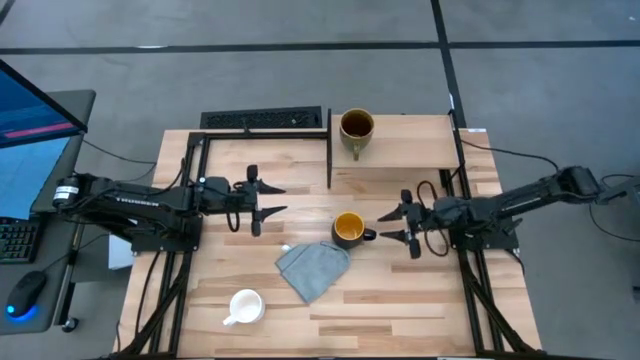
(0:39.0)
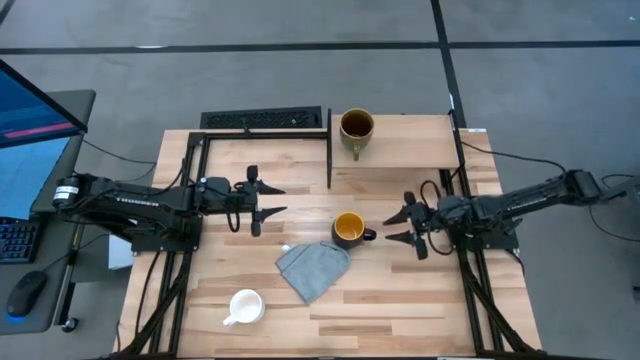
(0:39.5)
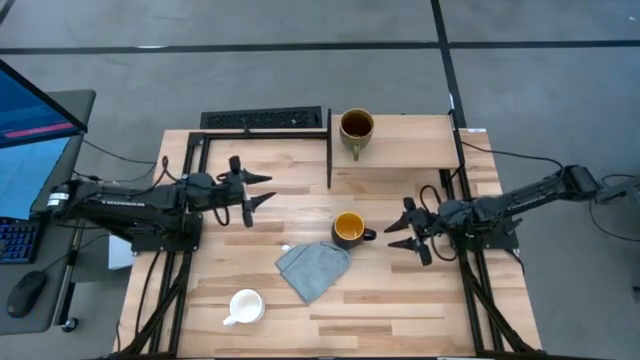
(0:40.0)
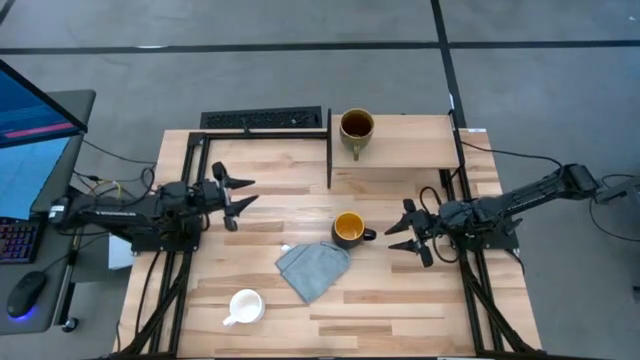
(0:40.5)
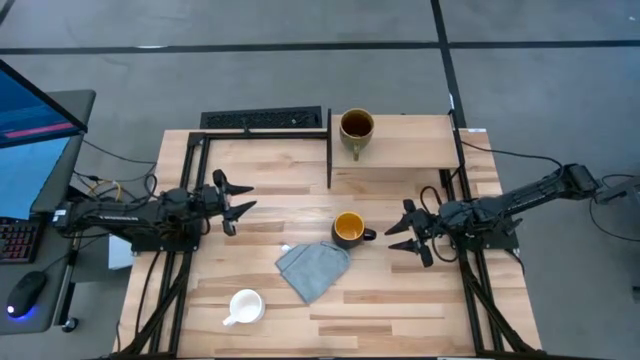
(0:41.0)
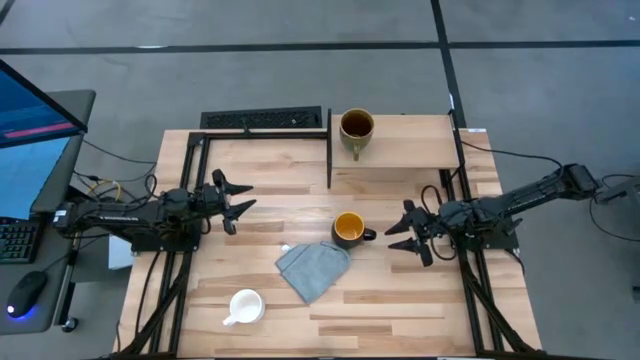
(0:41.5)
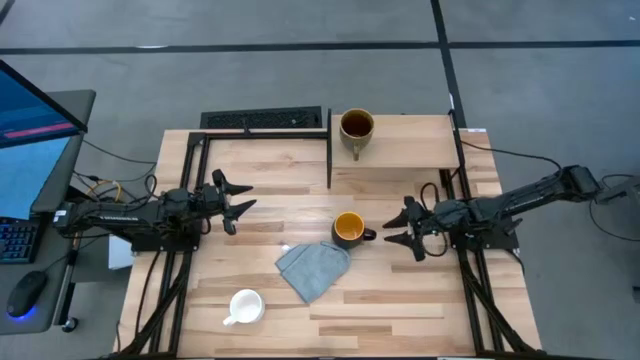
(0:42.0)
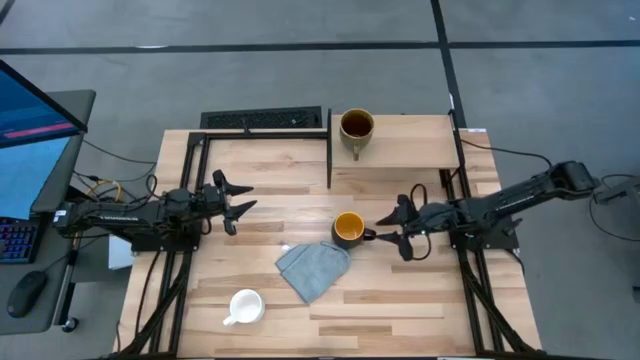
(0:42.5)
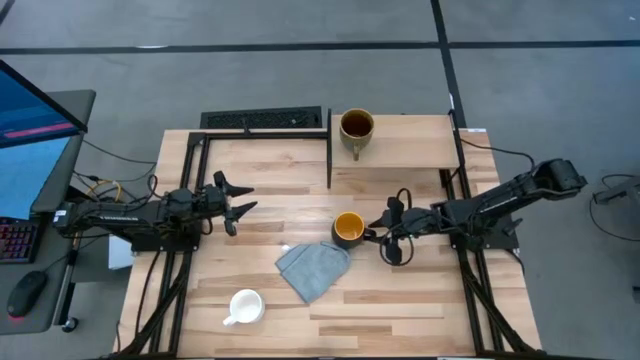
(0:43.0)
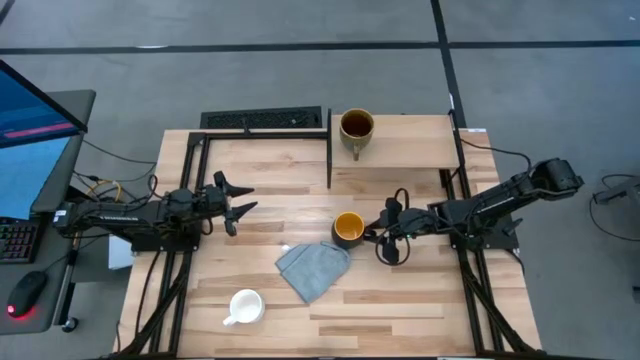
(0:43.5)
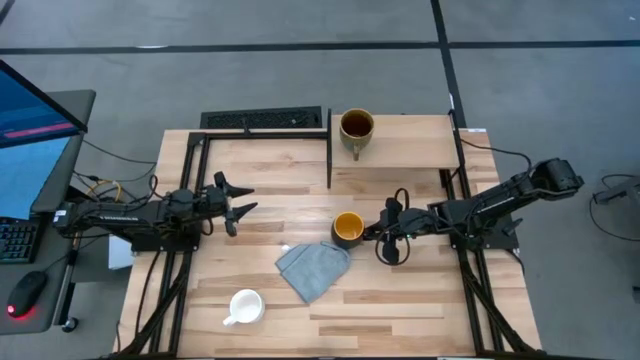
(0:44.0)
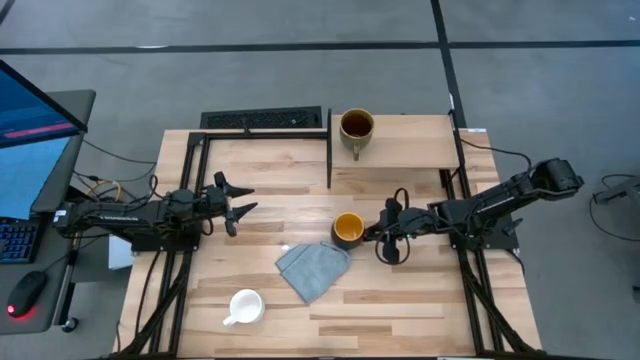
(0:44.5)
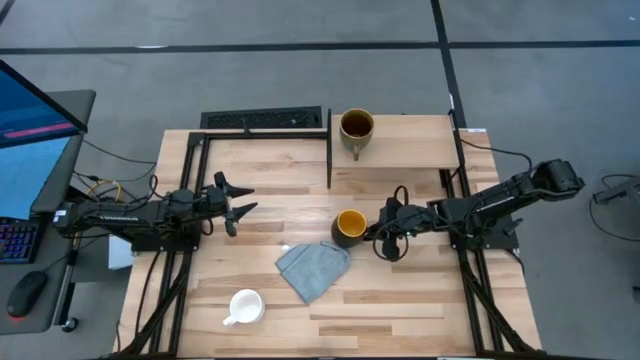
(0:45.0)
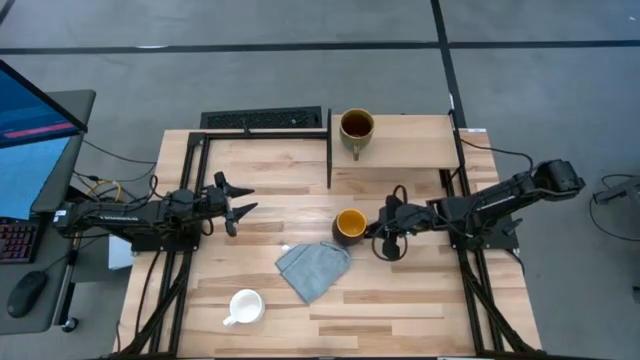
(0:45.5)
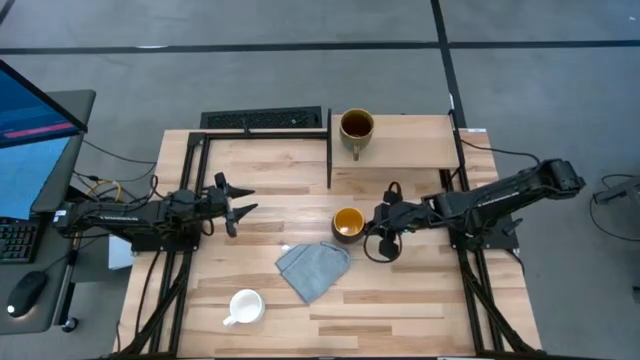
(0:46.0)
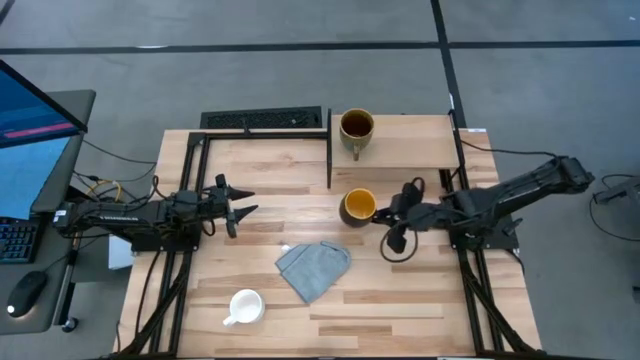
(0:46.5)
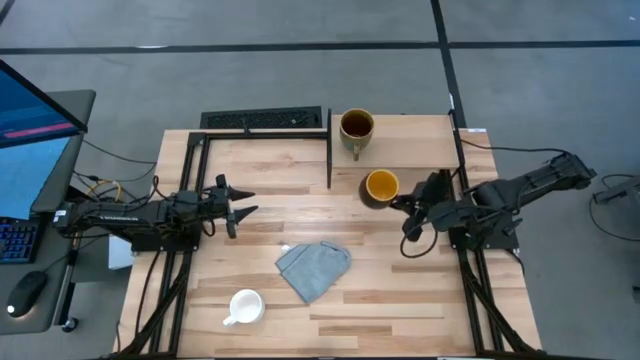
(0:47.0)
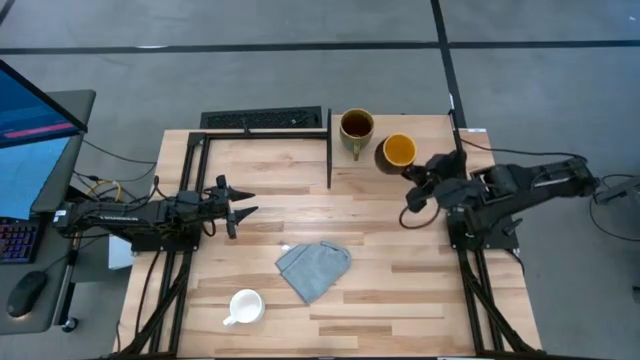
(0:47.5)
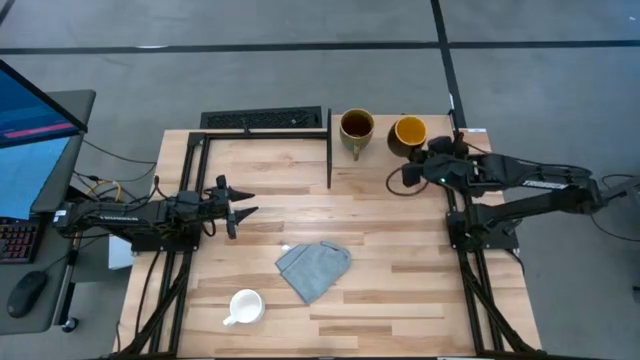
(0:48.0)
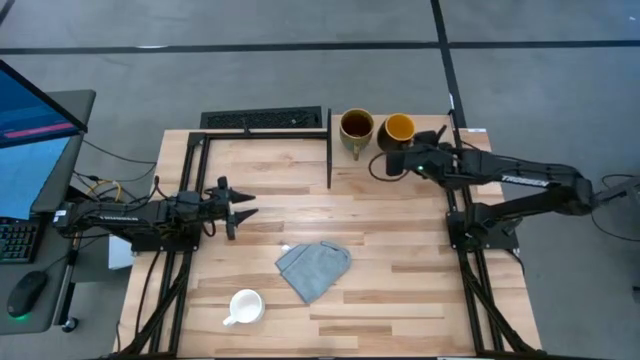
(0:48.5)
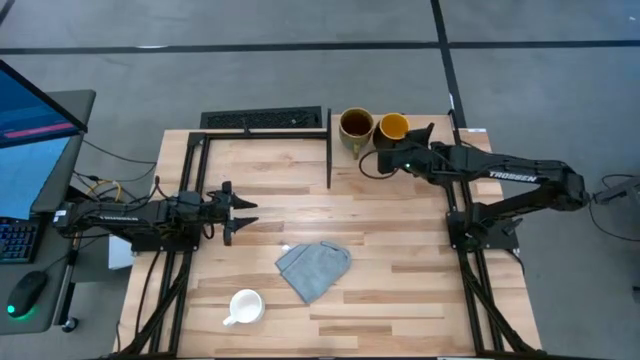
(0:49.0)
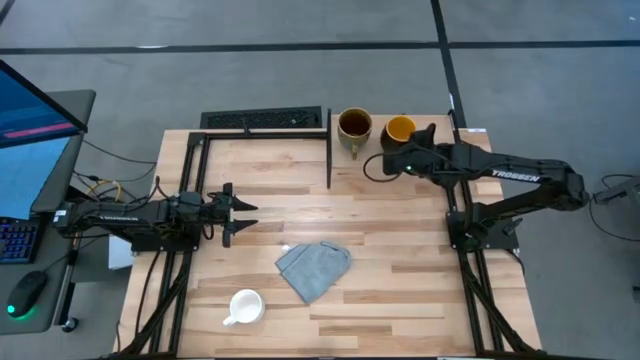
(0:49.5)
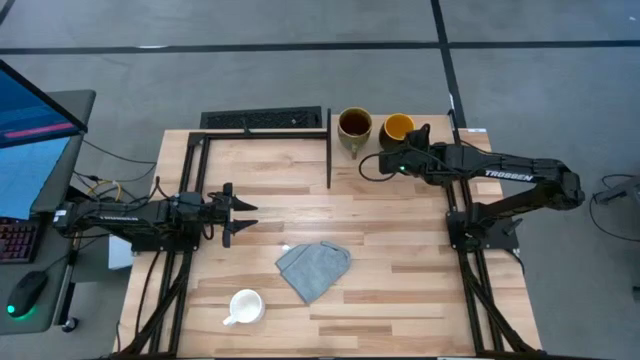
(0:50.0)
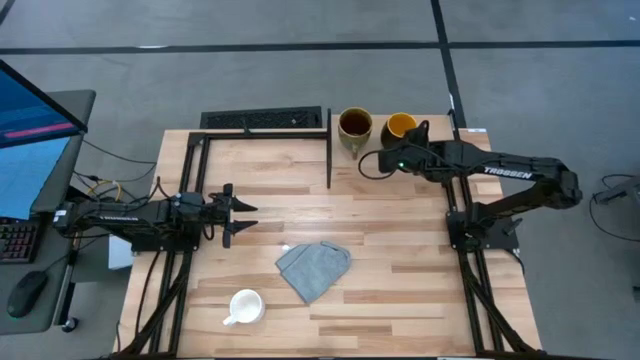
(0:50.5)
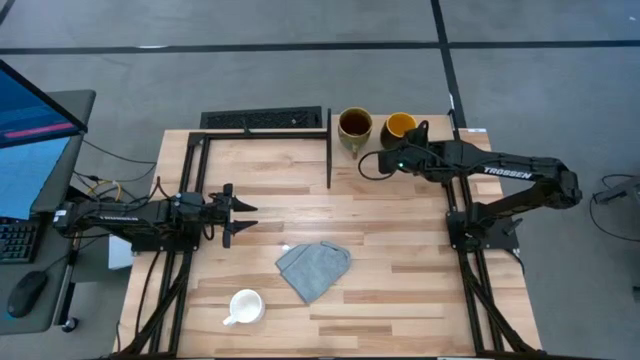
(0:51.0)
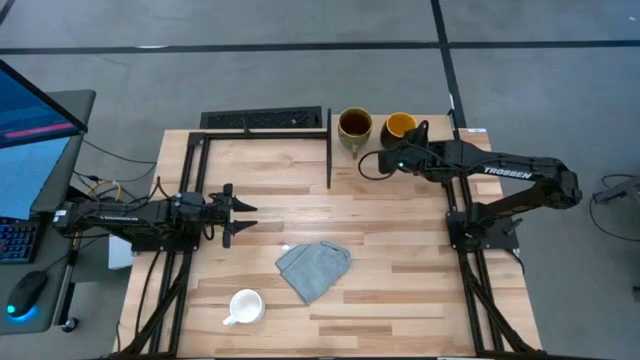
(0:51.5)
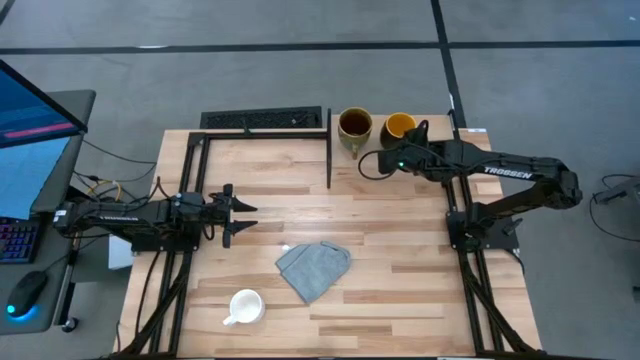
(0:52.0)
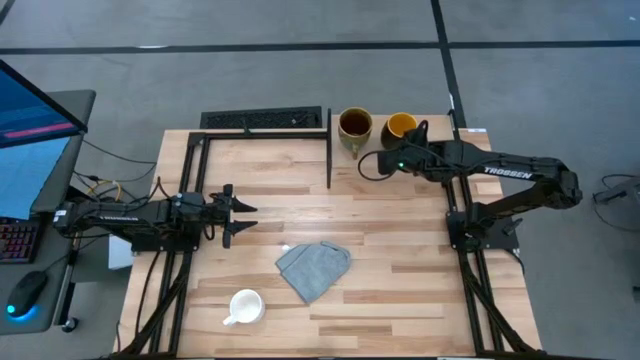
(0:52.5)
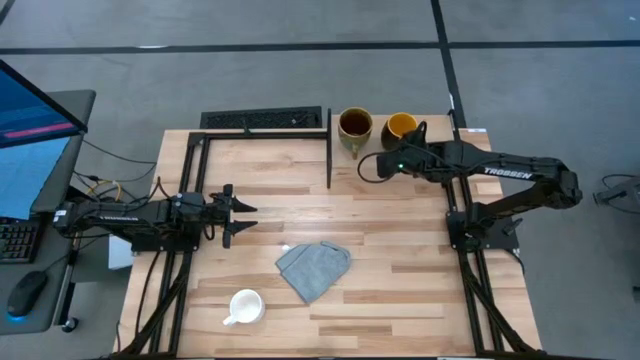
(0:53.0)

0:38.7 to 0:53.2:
Task: Stack small to large cups/mugs on shelf
Put the yellow mug on the shelf

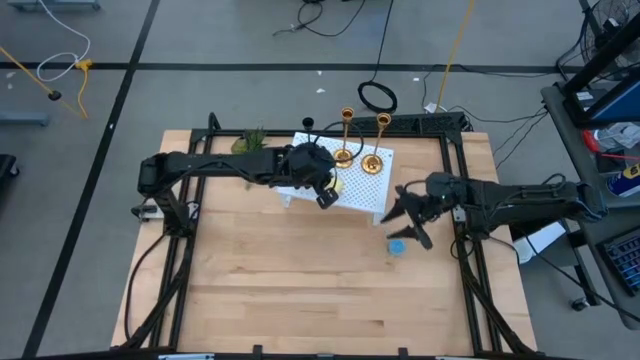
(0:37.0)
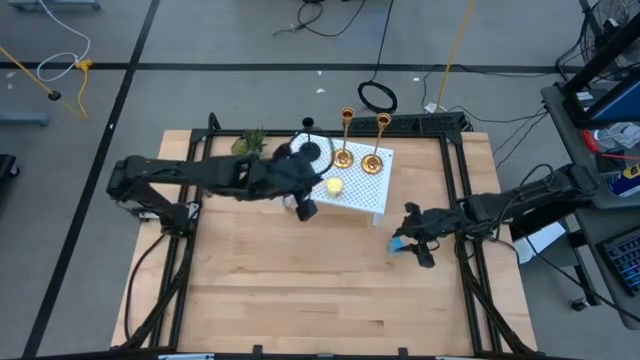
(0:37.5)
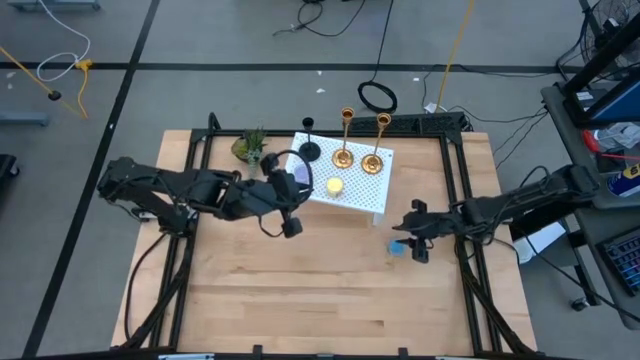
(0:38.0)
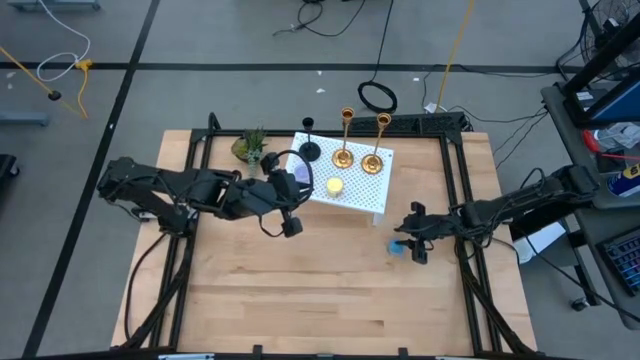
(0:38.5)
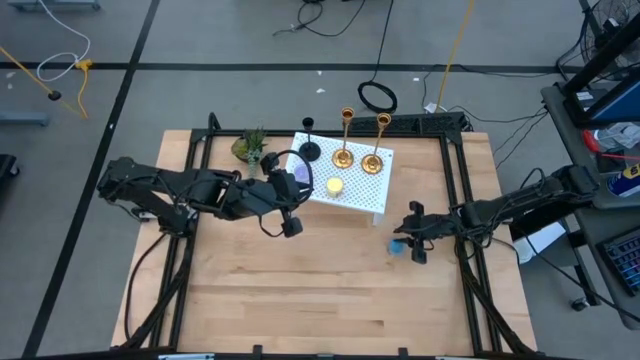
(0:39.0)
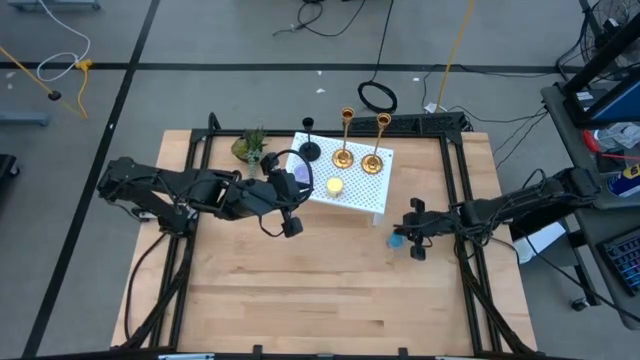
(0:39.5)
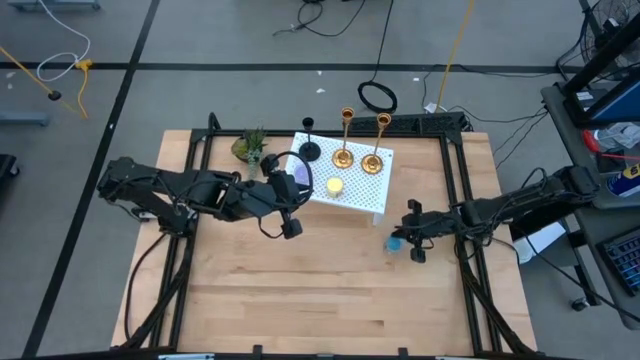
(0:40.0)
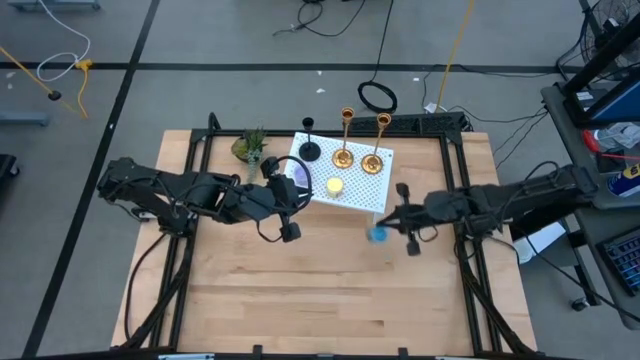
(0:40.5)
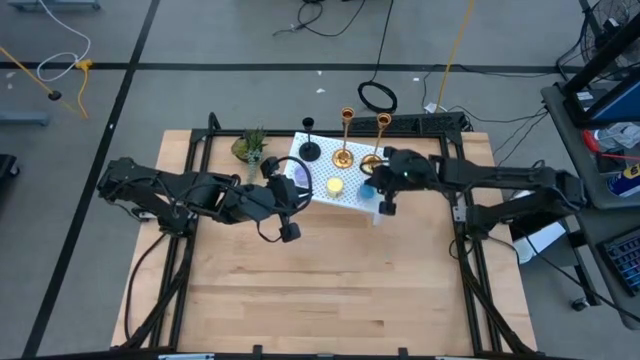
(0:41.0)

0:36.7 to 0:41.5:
Task: Pick & Place candle stick holders
Put the blue scented candle on the shelf
